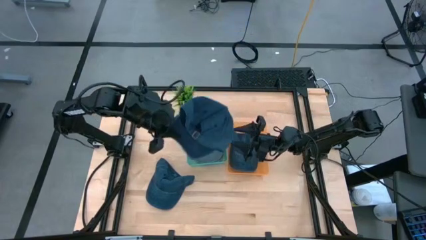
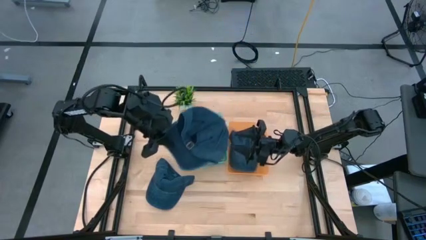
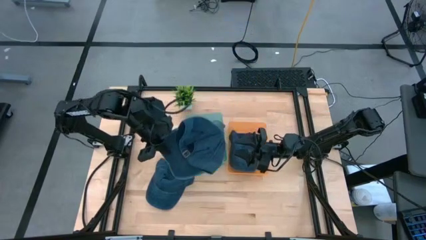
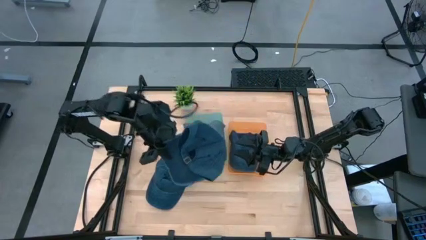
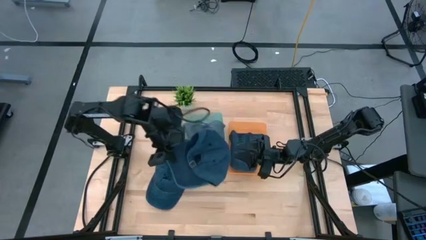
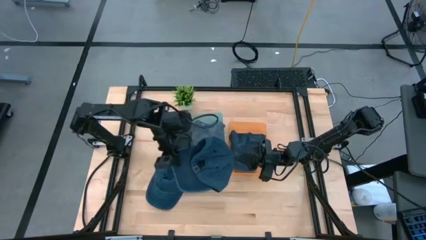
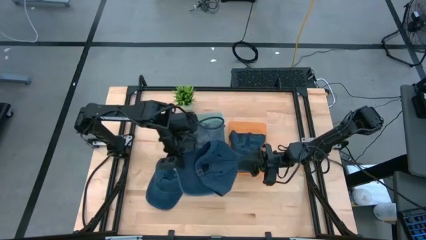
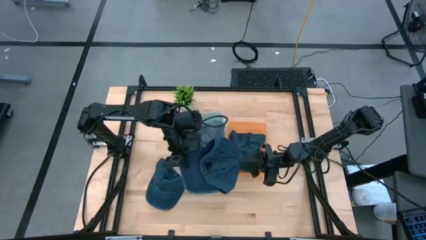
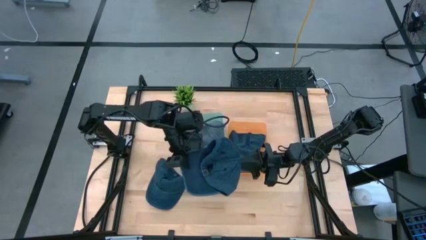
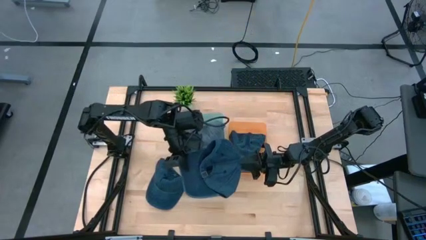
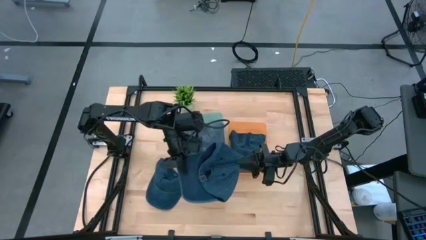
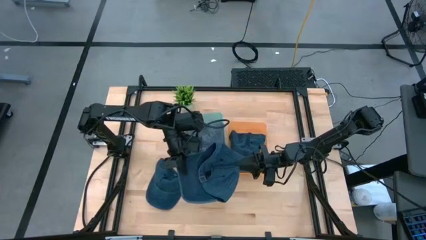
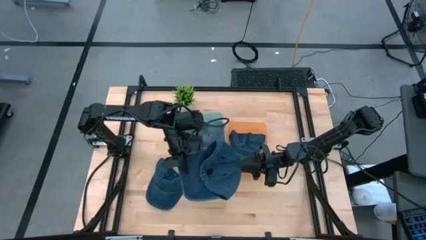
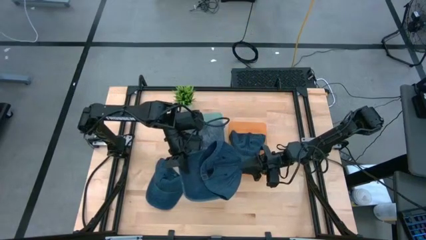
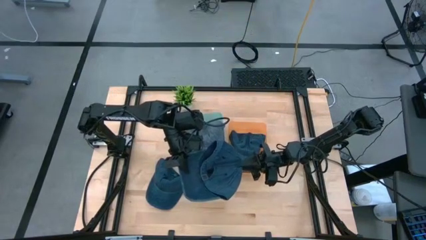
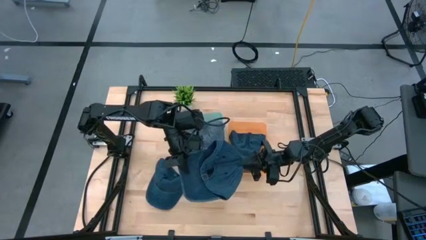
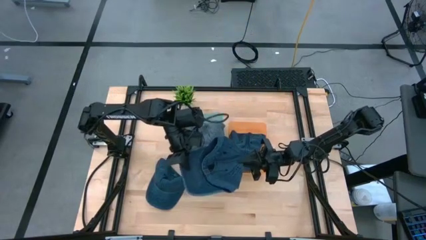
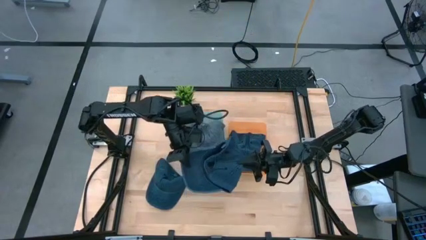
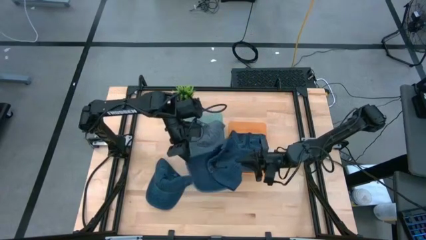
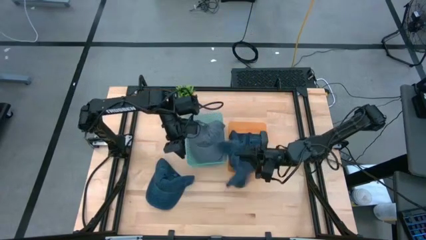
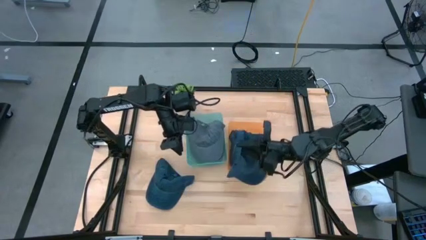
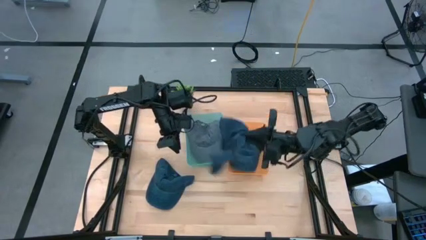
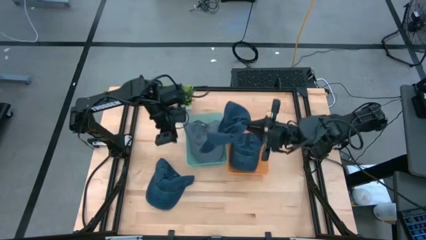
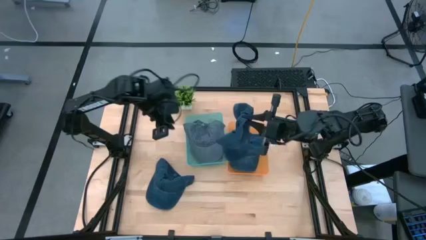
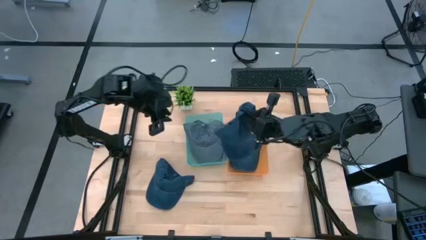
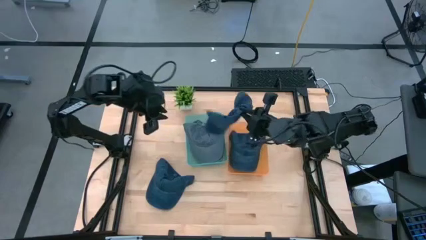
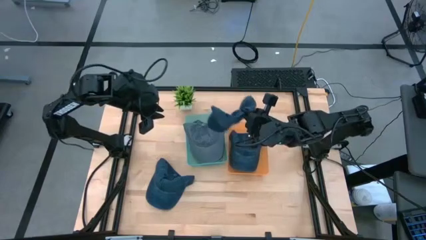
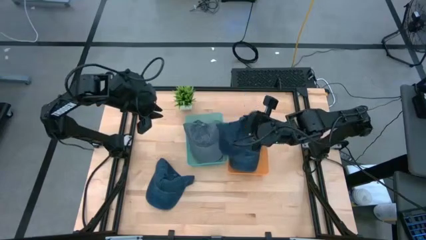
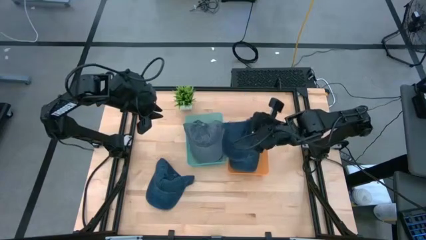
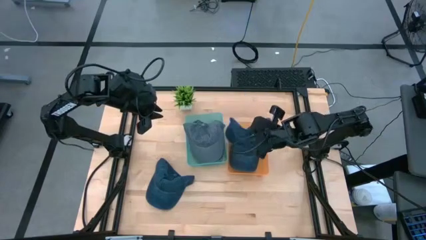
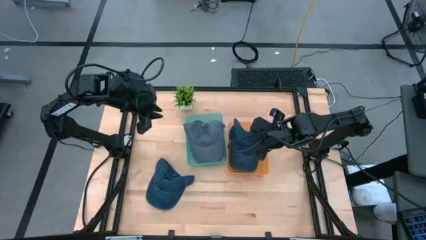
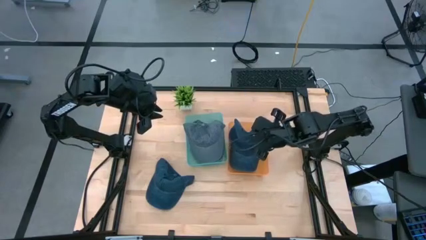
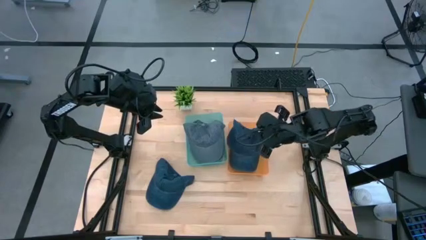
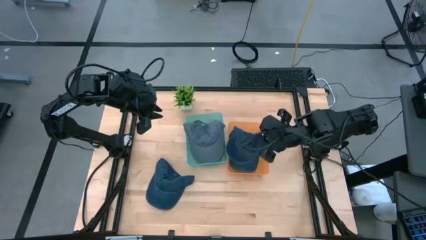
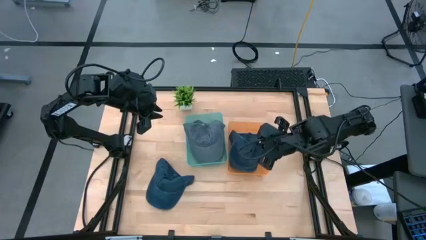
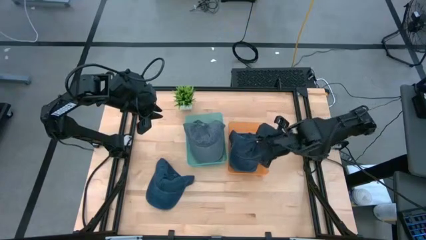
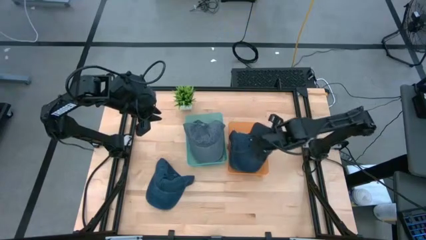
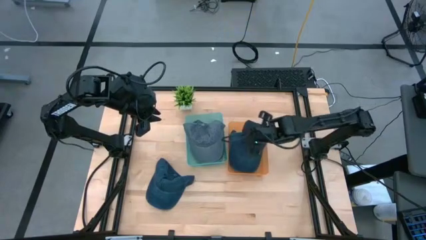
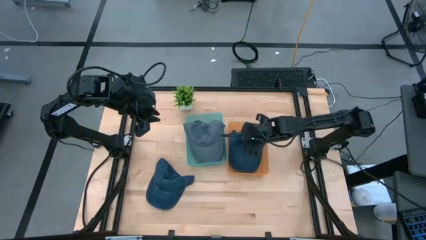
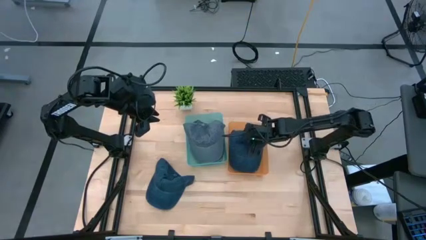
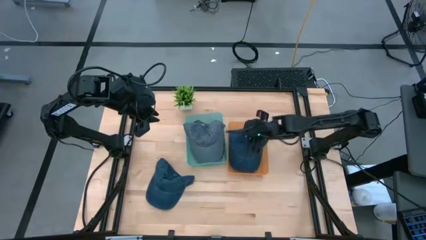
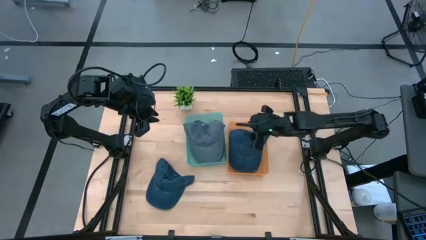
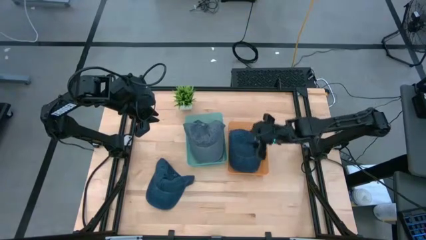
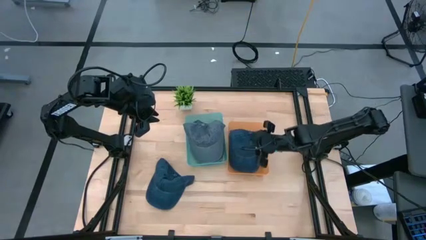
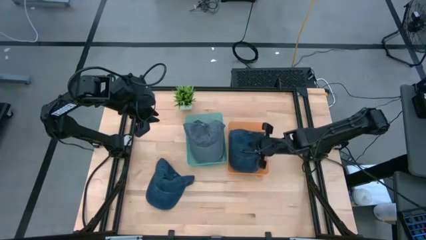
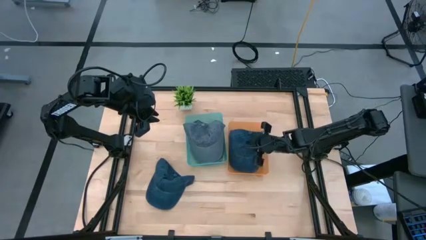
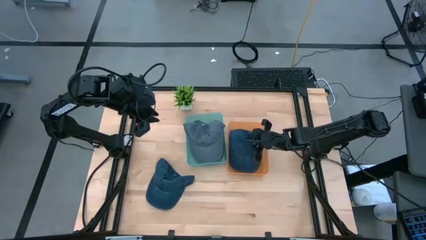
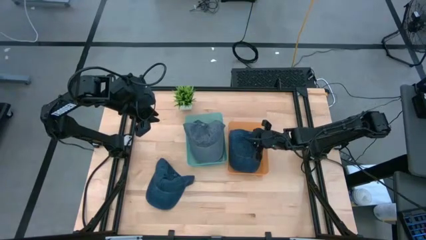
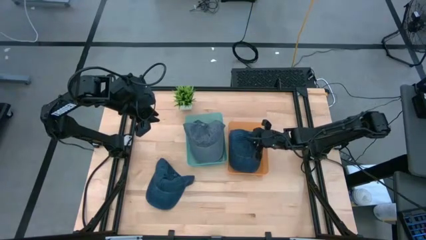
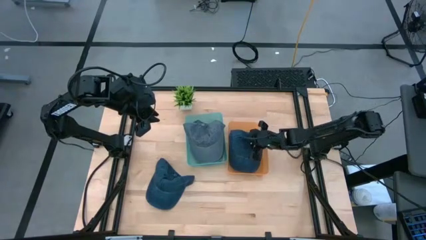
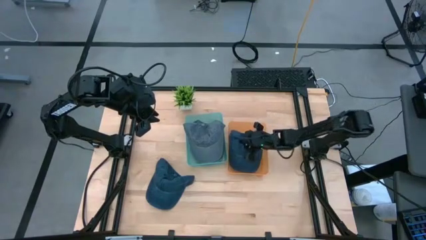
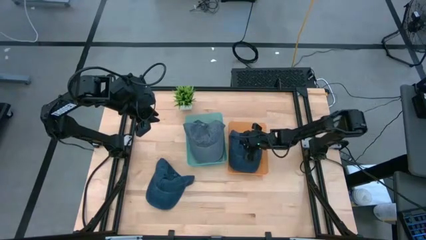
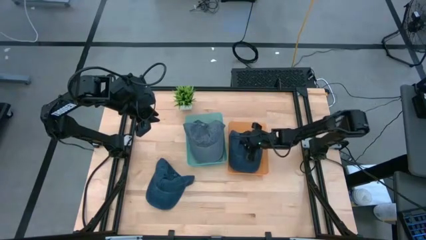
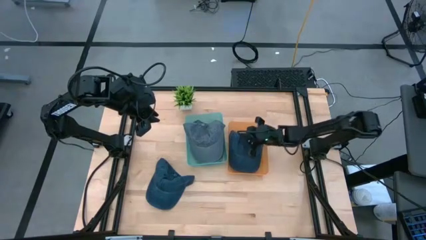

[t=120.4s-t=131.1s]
Task: Pick & Place hat
Put the right blue cap into the orange bin

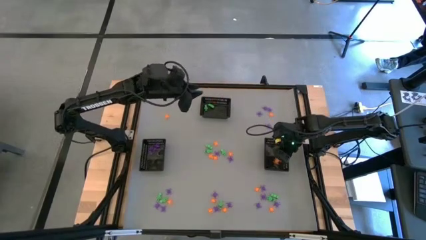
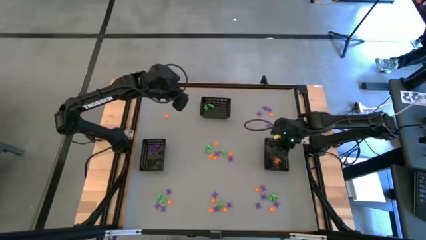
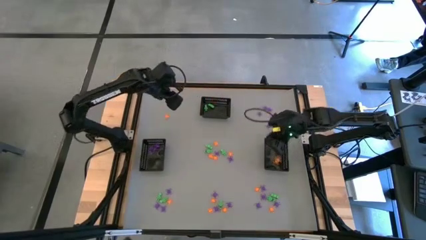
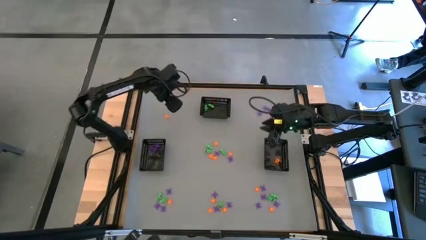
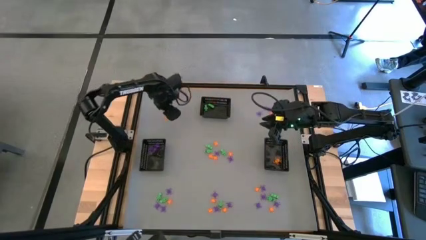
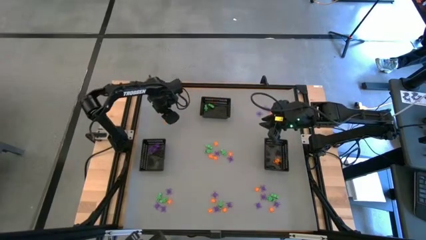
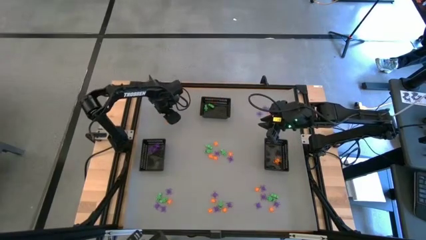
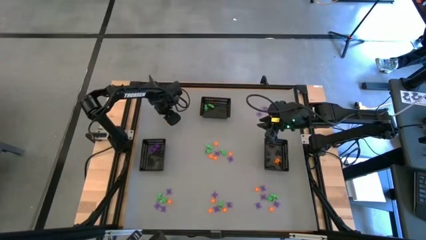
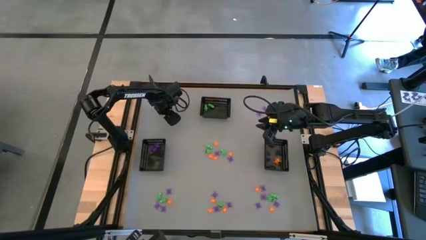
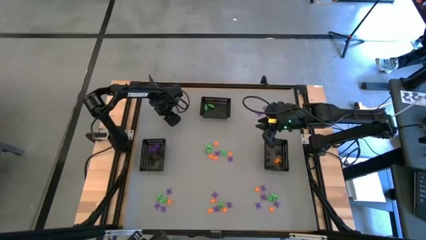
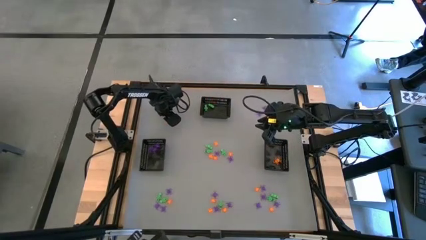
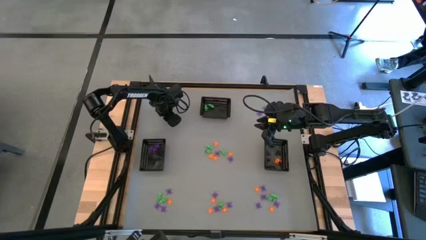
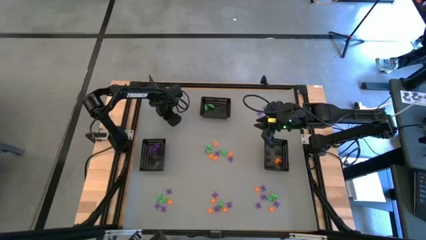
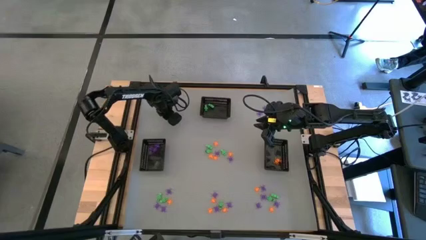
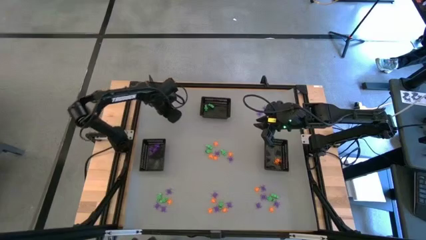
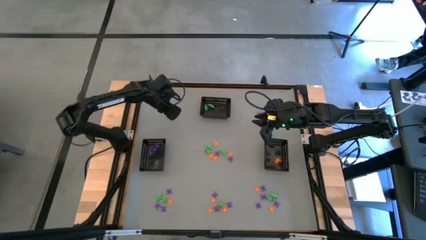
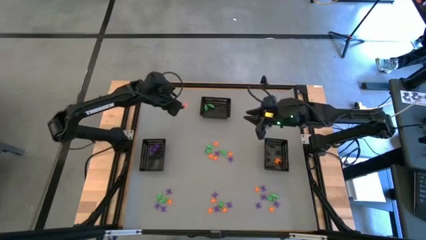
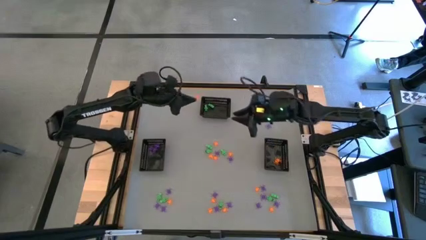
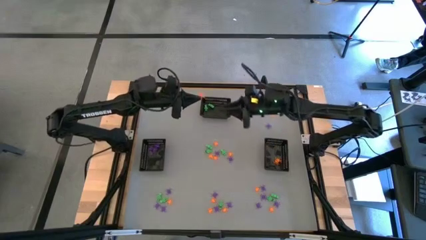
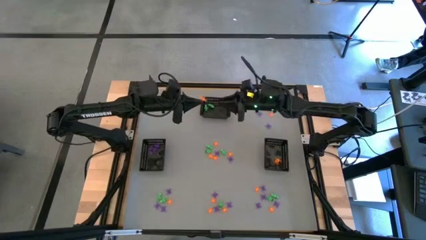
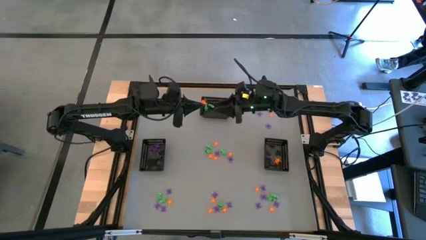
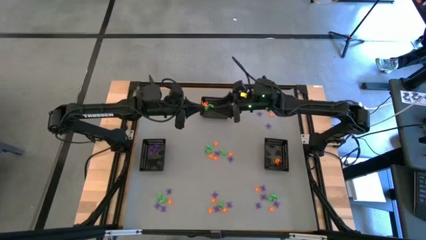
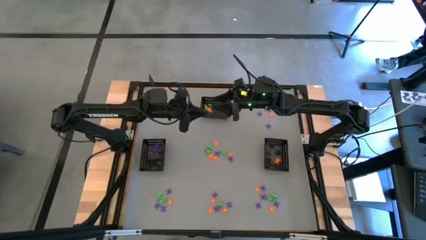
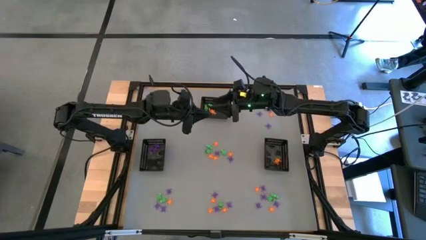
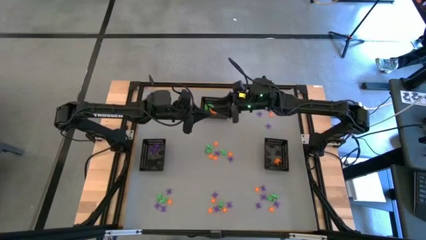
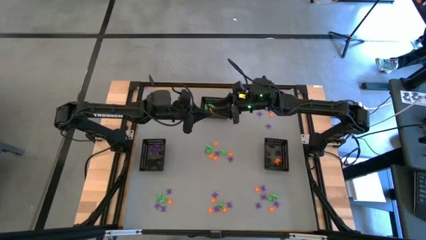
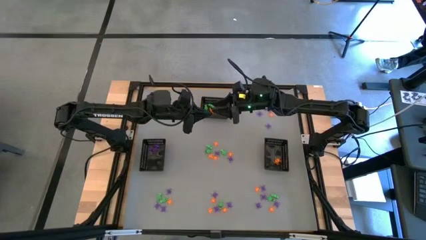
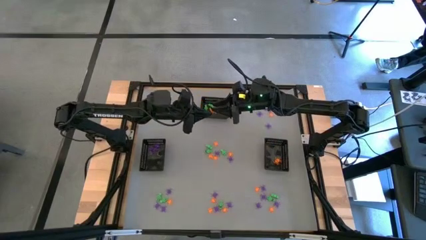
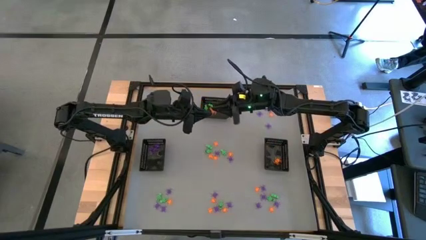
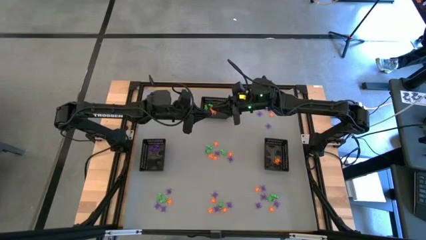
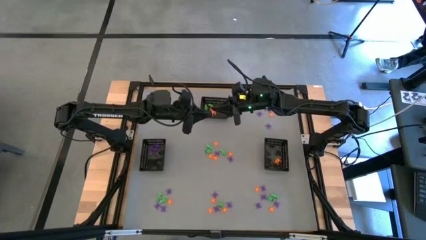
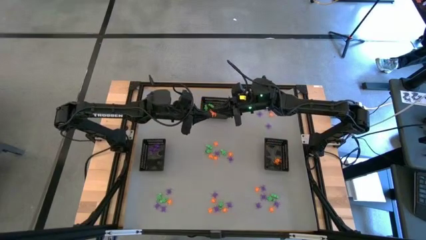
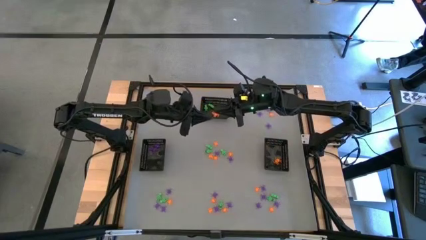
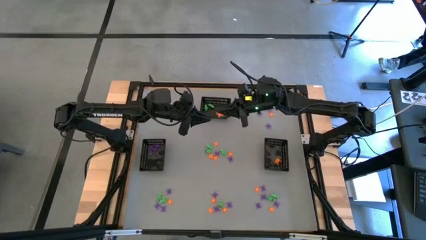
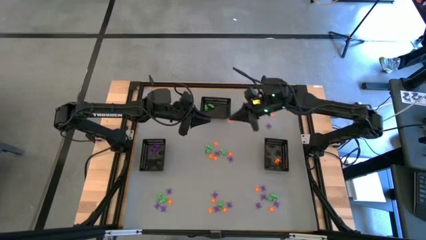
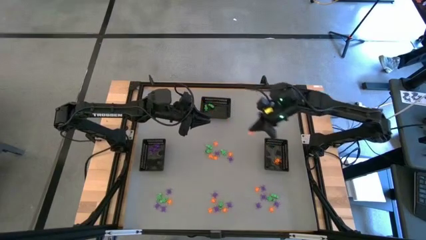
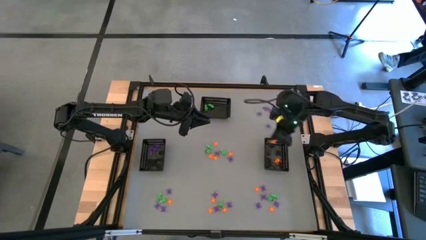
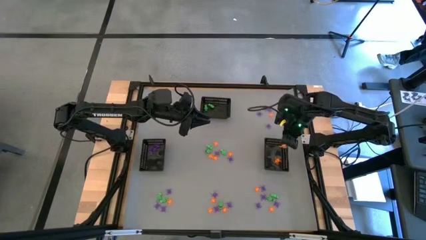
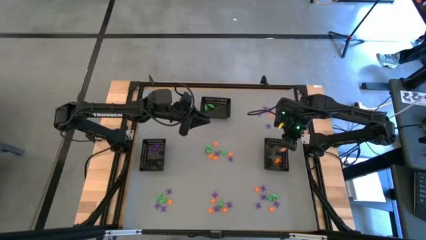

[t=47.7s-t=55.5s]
Task: Sort Halloween decoration
Put the orange spider toy into the right bin
